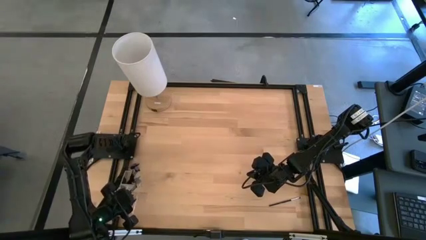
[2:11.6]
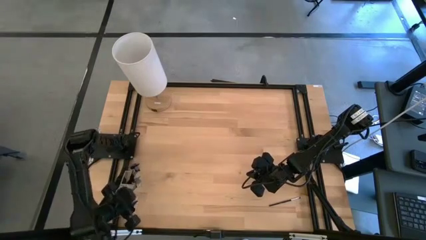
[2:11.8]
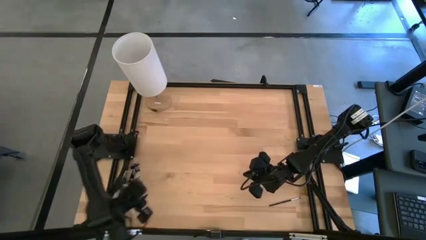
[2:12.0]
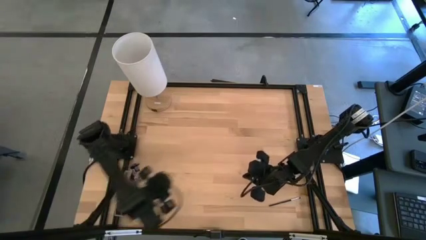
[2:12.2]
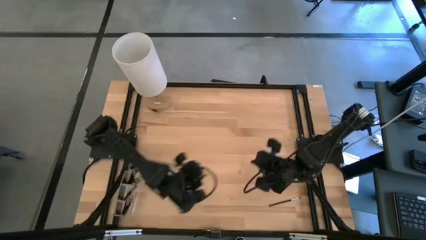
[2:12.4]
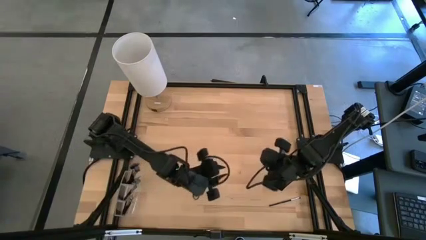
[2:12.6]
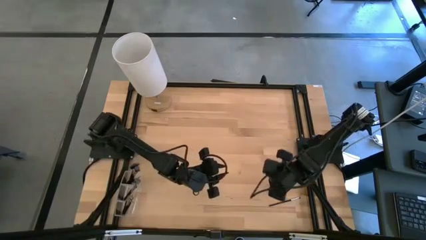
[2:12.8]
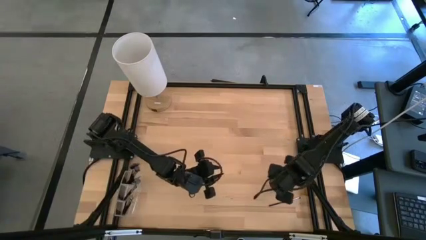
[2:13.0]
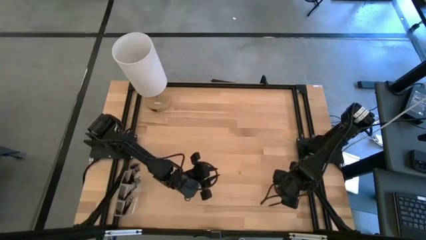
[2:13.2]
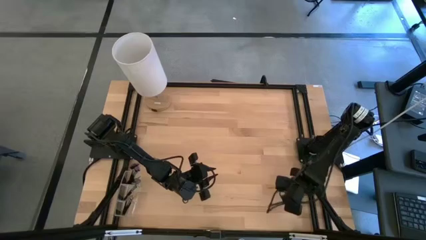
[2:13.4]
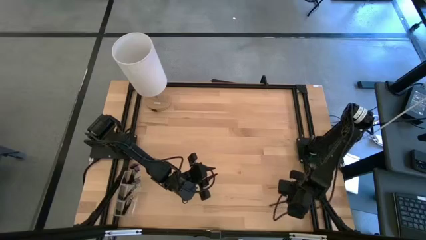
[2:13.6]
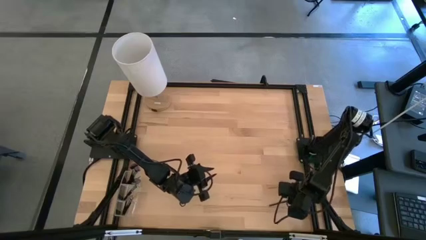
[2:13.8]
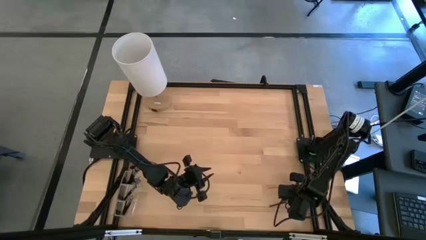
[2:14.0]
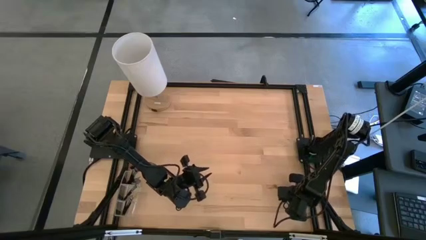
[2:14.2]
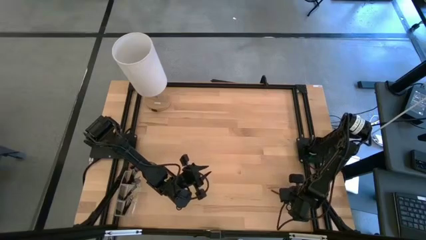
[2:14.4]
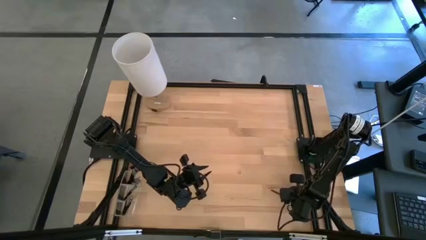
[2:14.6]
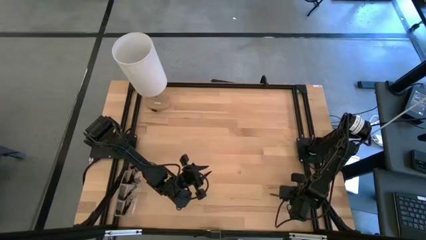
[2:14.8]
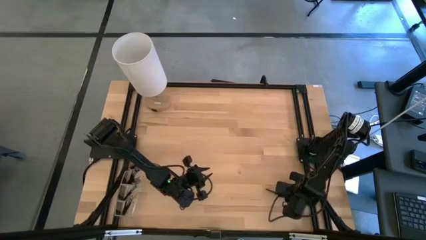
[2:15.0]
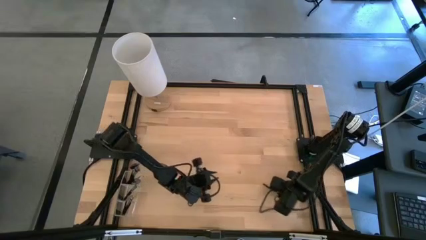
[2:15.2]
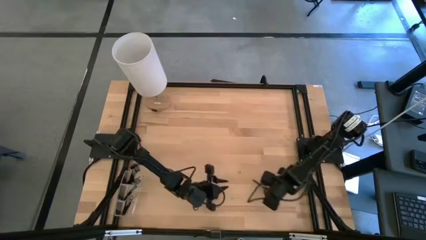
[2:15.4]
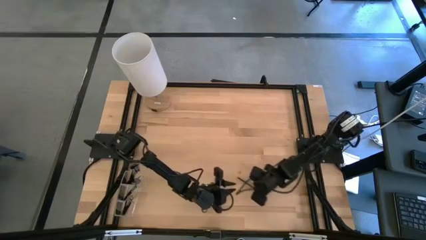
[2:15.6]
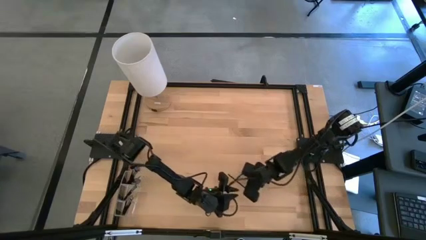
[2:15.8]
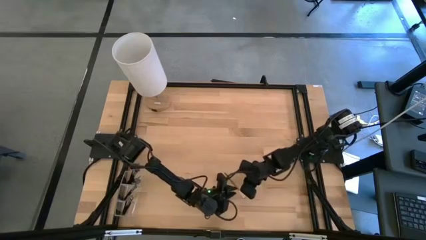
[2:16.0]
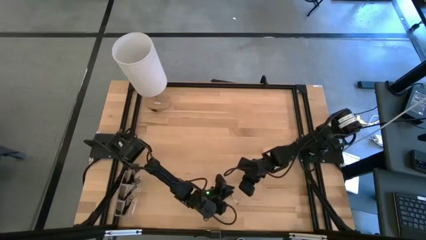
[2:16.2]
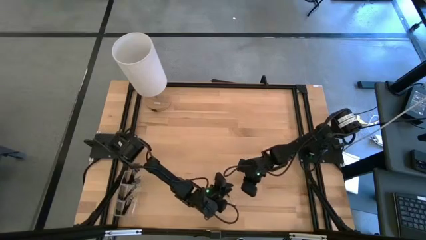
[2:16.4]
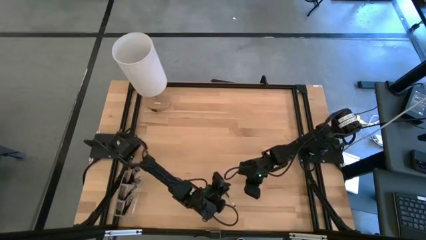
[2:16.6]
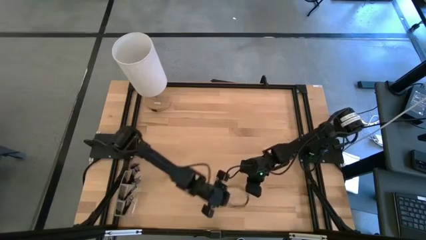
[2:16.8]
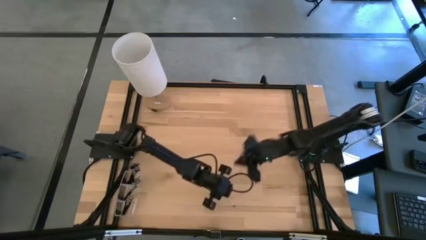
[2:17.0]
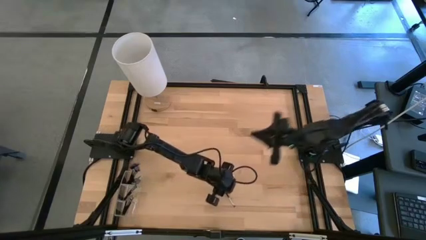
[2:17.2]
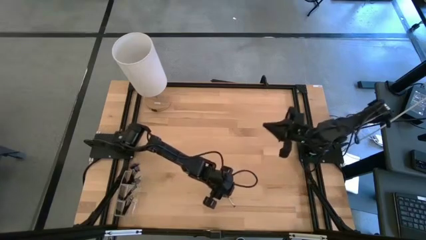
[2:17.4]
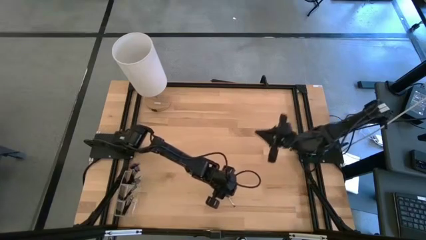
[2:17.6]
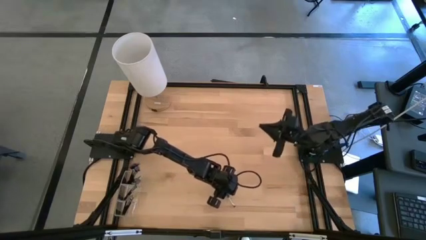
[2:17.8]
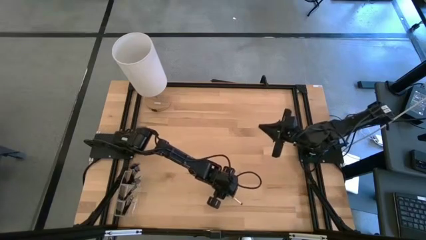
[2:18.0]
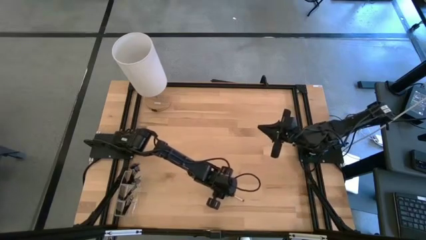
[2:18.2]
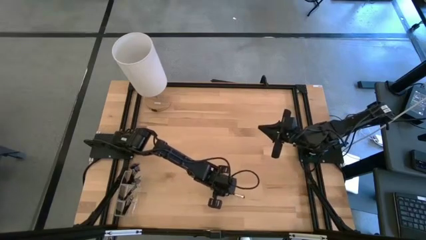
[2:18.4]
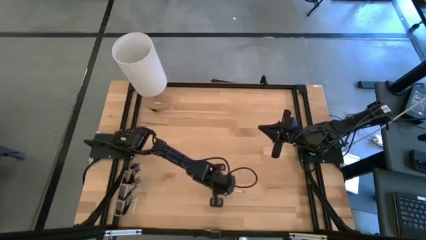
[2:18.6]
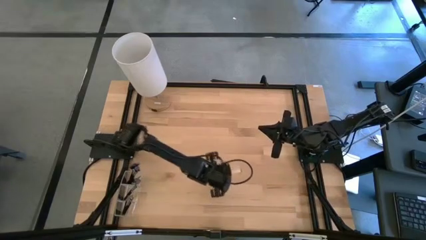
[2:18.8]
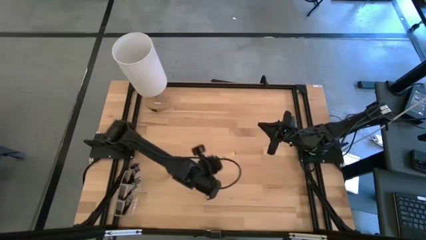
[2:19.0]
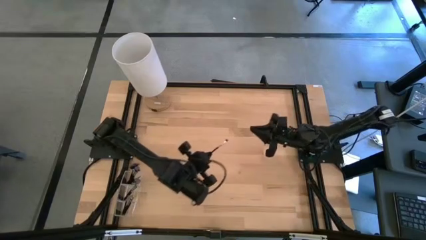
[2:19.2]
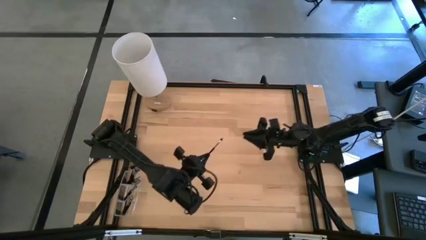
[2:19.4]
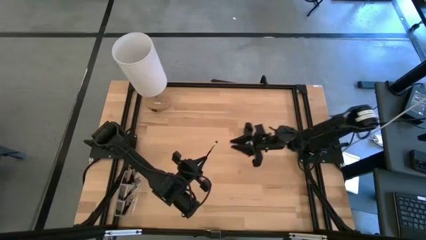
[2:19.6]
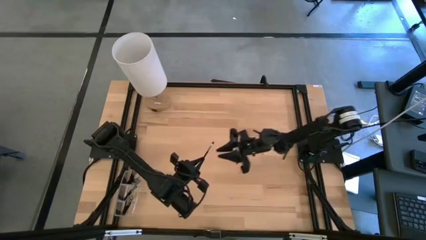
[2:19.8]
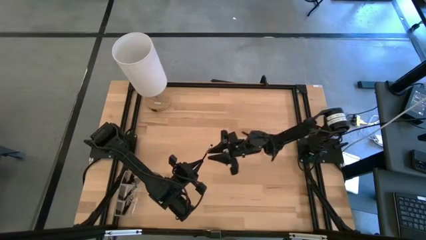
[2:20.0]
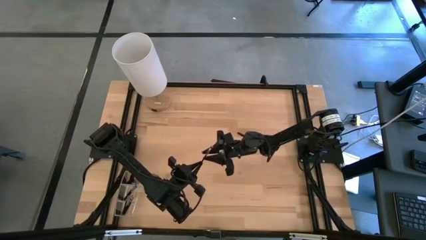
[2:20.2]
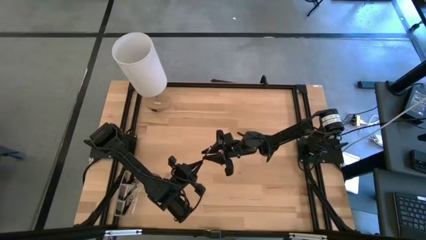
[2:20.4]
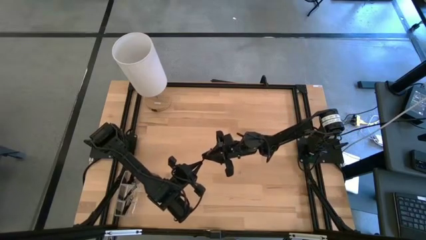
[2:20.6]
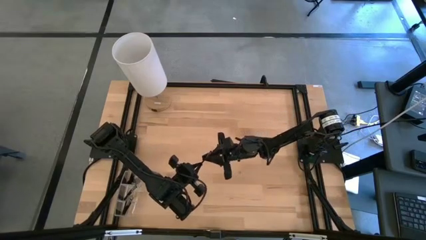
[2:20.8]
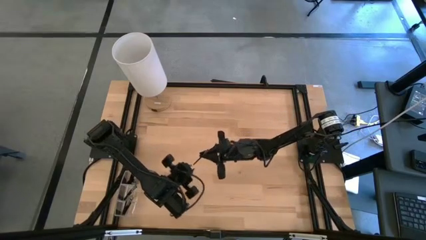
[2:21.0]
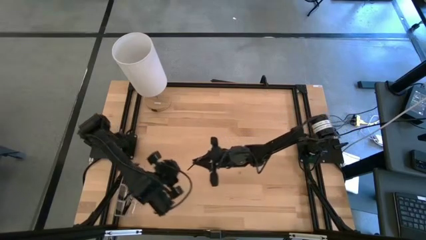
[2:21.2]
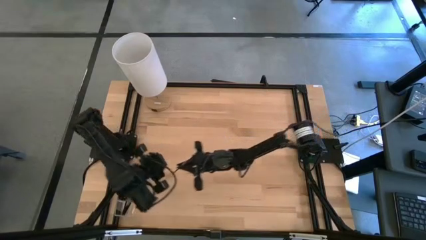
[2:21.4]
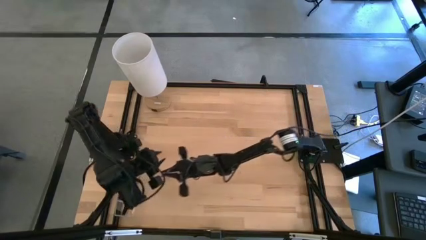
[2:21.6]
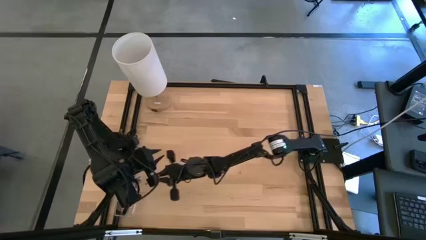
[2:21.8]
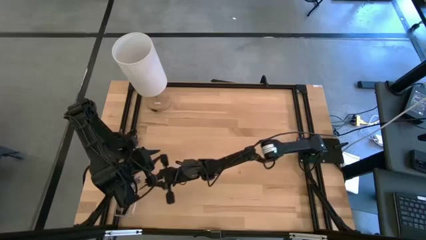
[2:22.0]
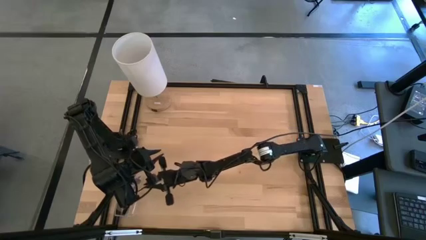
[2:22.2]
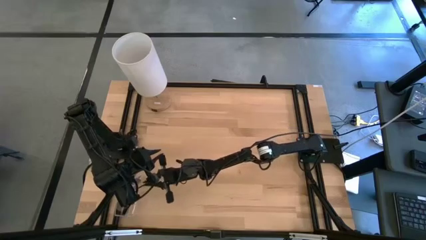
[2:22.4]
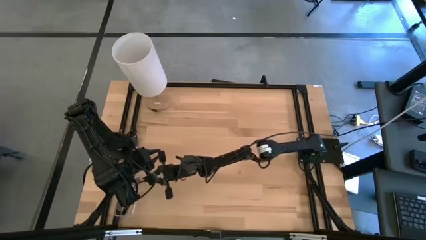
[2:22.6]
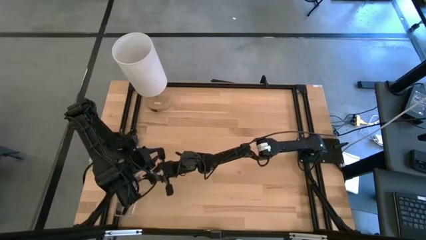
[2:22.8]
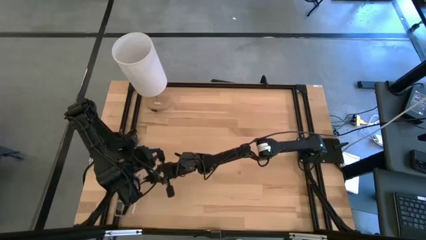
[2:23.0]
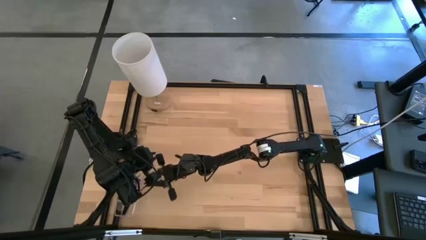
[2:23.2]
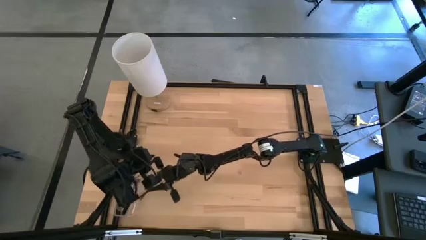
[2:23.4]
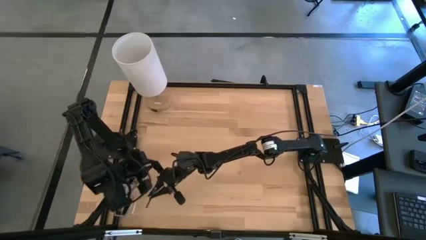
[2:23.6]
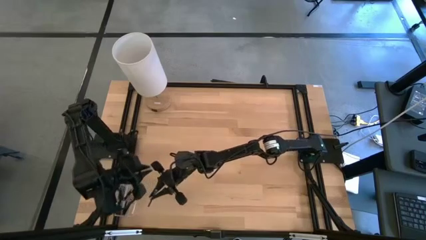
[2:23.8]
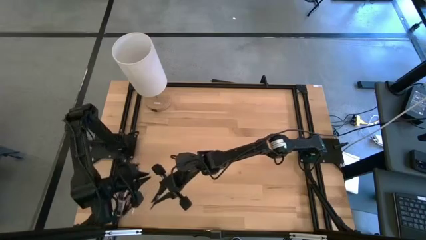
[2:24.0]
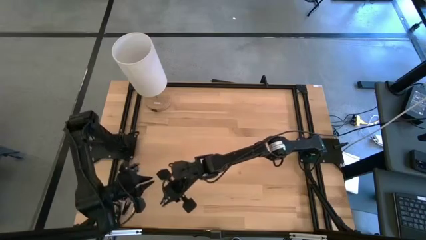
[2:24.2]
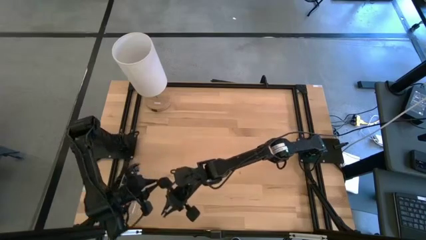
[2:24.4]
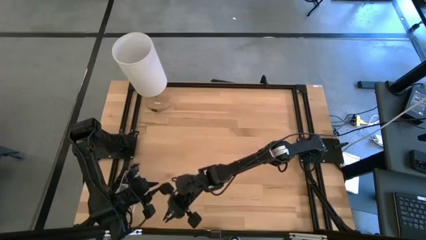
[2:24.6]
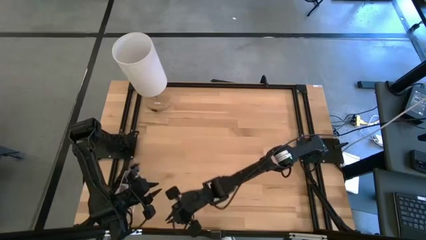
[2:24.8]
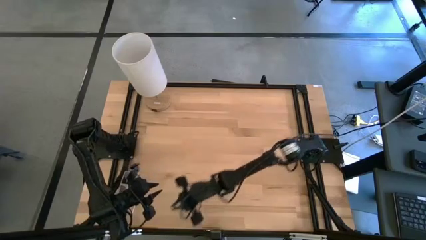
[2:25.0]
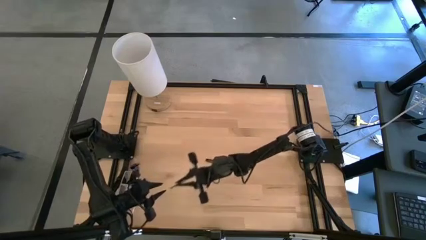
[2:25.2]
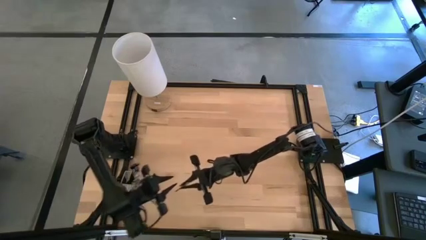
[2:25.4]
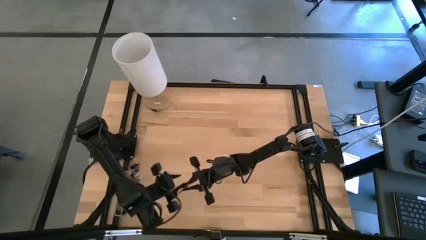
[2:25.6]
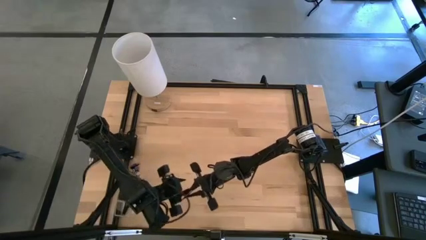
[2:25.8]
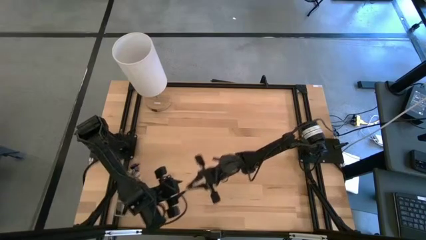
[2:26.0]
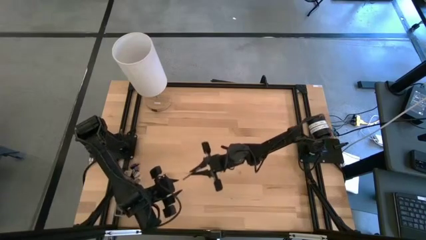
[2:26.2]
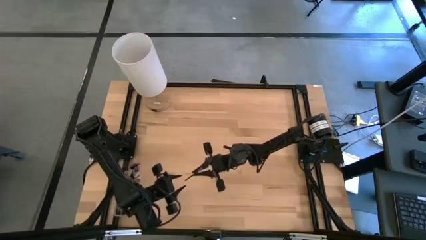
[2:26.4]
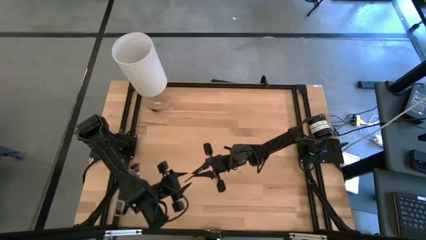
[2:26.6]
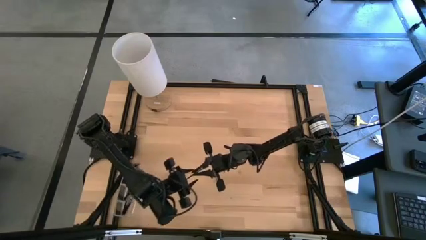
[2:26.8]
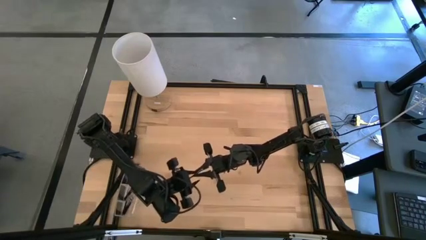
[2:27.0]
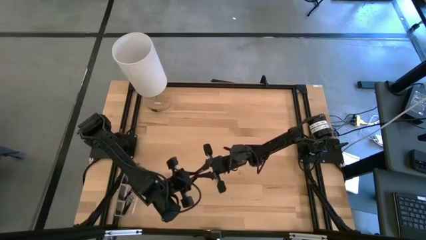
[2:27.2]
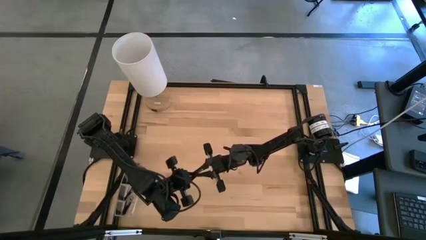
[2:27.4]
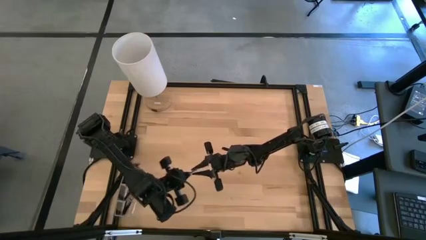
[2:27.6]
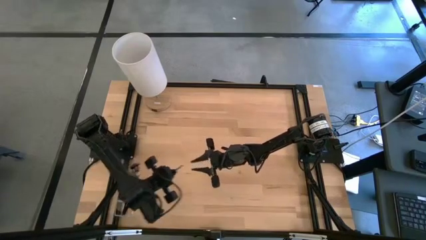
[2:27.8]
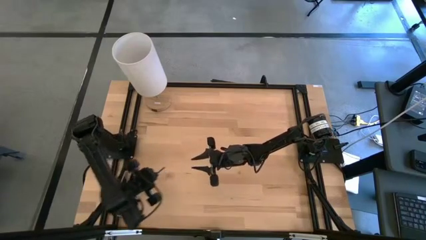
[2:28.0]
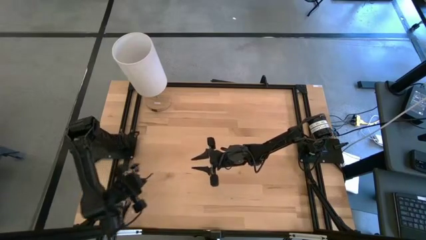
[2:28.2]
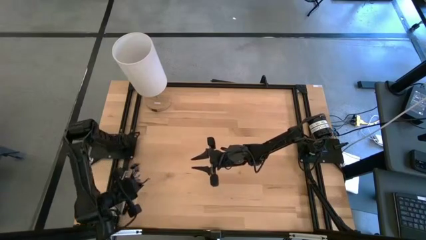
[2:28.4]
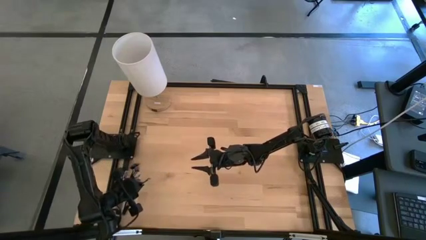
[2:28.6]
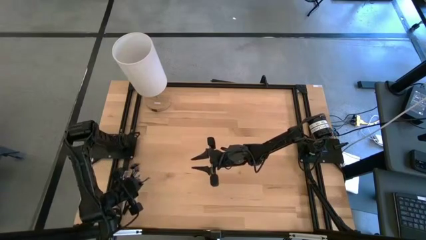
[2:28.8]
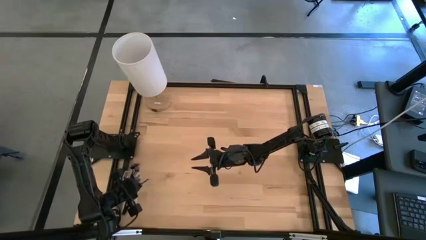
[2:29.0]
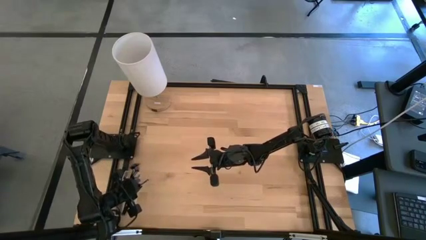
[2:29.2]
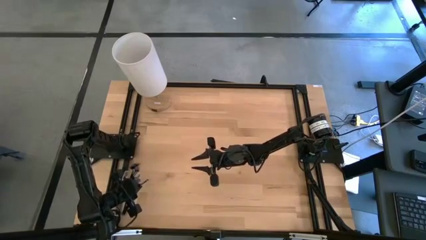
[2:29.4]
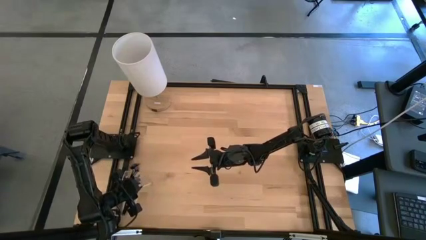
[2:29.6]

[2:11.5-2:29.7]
Task: Pick & Place Makeup Supplies
Put the makeup brush into the transparent organizer
